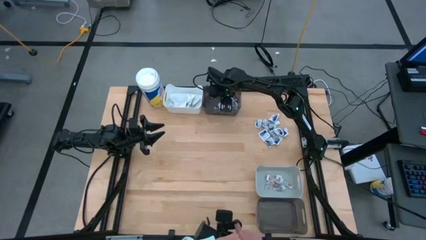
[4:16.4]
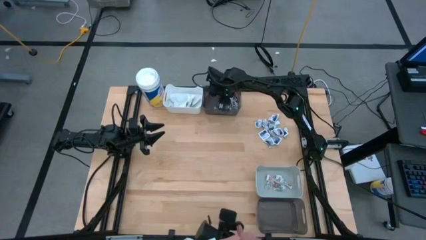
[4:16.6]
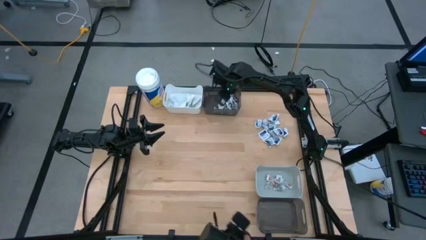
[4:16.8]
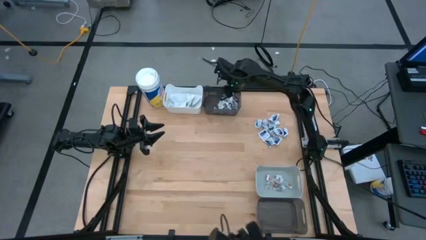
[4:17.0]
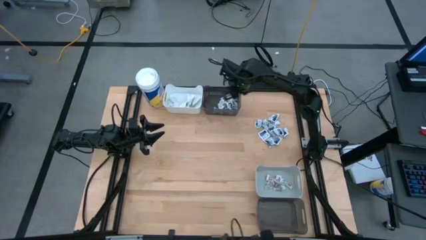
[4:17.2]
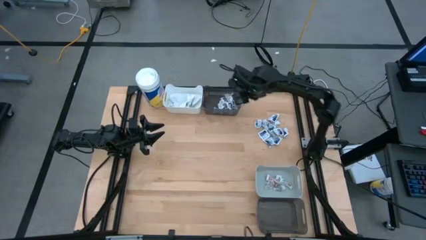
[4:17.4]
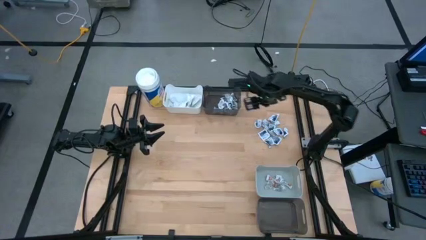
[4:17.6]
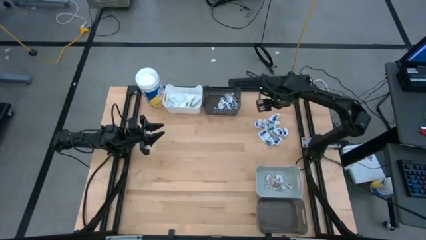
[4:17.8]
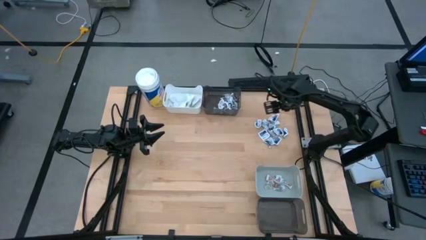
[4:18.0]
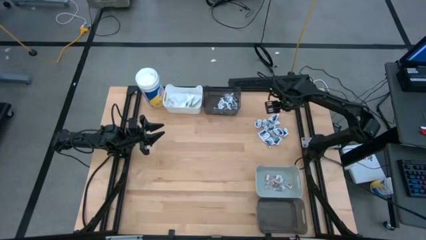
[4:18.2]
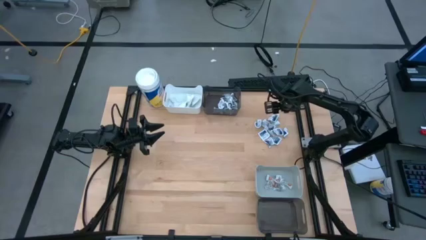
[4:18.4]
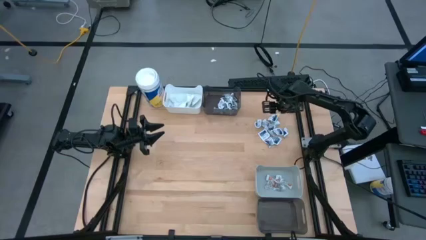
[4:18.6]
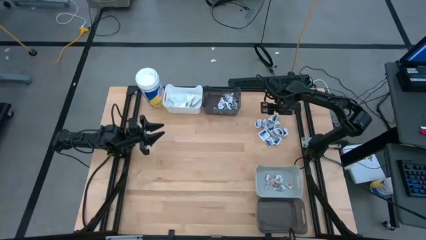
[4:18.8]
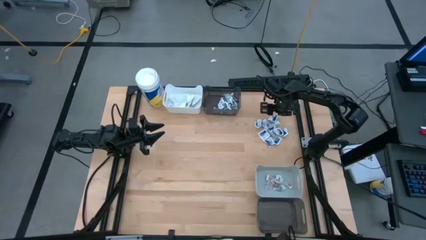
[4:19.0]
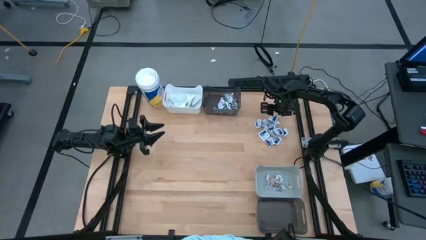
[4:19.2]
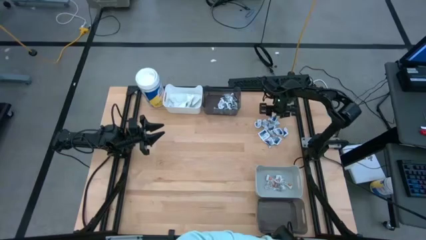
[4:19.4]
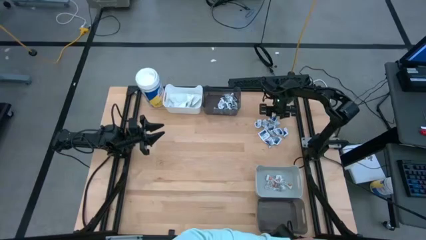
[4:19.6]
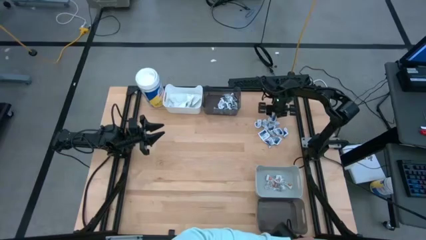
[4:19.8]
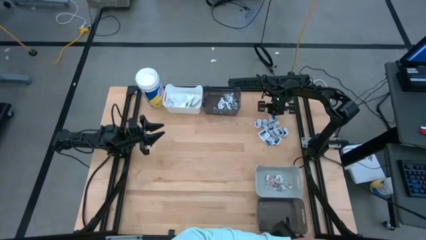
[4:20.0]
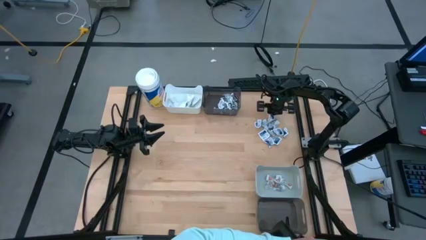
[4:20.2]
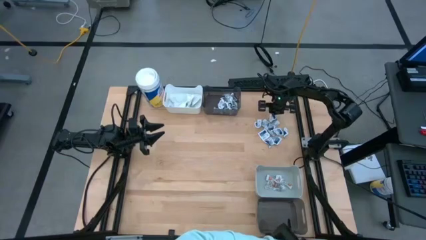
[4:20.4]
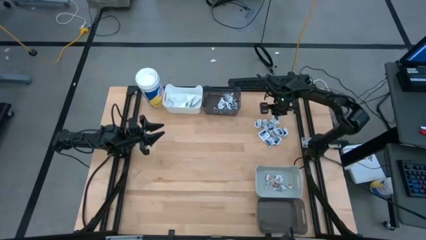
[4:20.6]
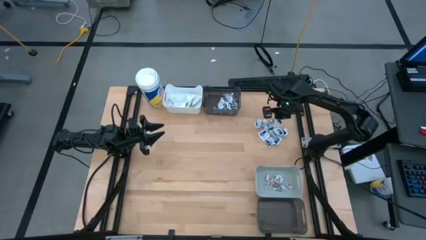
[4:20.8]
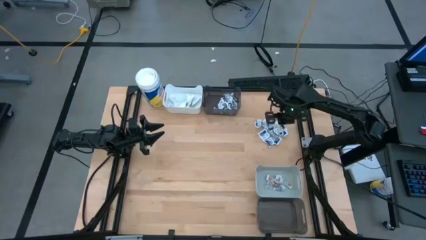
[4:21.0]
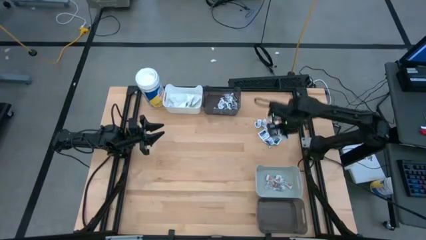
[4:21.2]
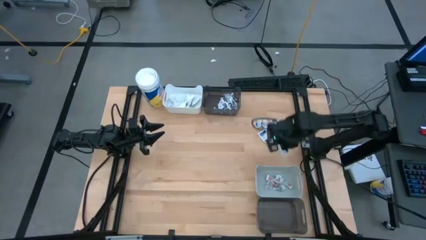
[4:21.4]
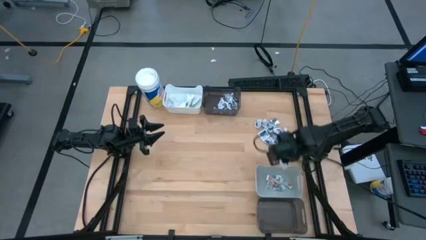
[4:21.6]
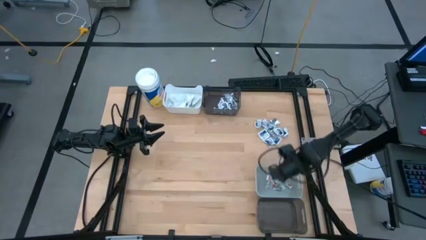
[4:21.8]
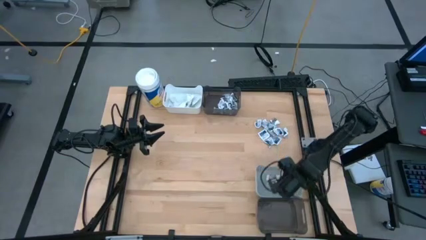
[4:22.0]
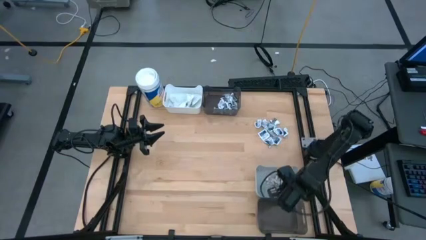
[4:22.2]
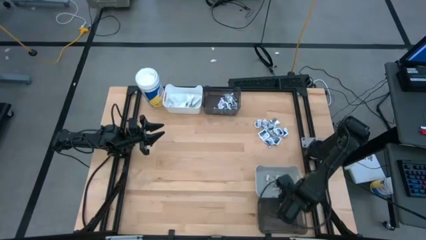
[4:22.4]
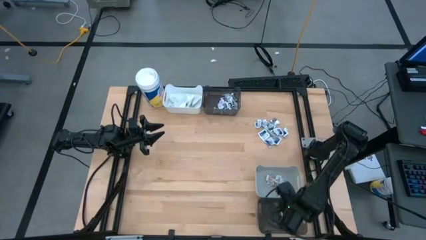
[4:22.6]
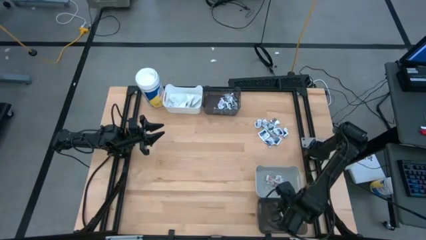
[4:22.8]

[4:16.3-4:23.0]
Task: Pick & Place First Aid Supplies
Put the gray towelette pack into the top black bin

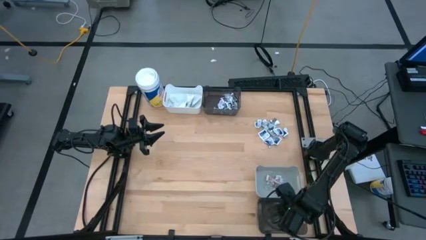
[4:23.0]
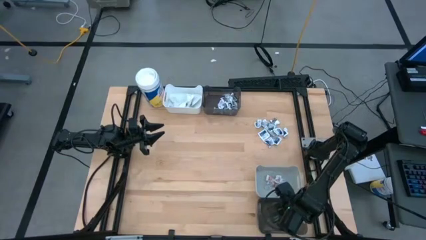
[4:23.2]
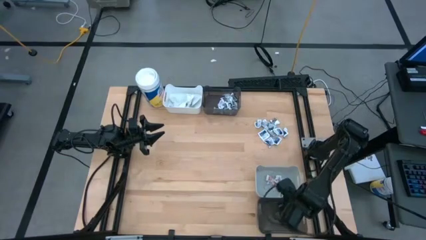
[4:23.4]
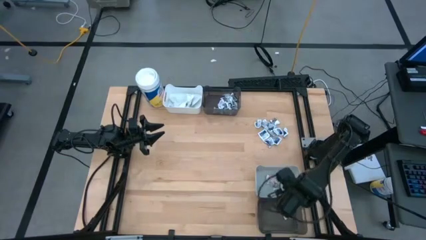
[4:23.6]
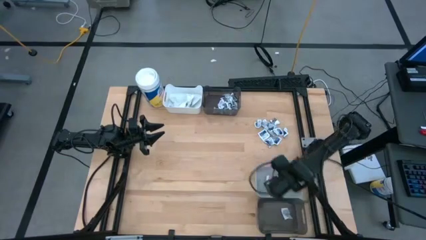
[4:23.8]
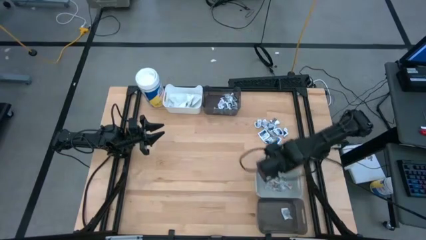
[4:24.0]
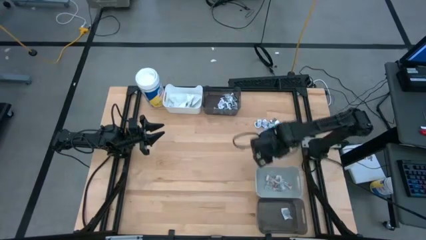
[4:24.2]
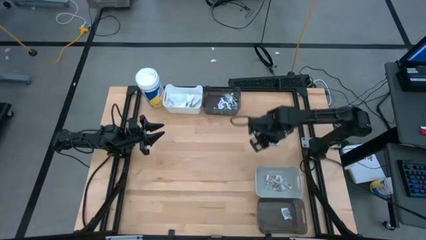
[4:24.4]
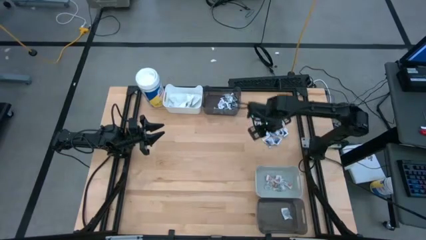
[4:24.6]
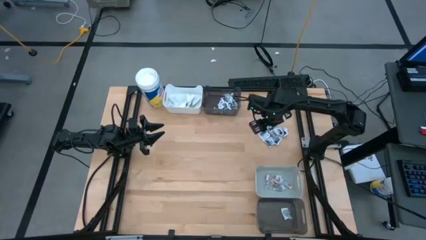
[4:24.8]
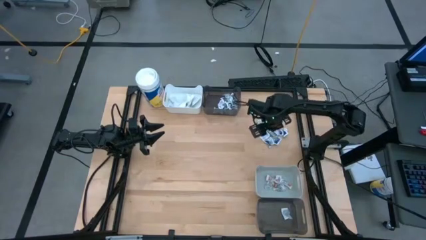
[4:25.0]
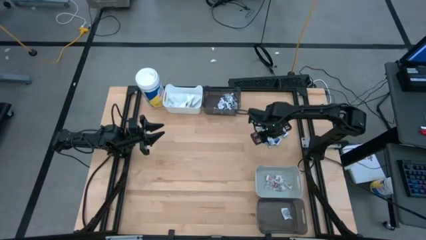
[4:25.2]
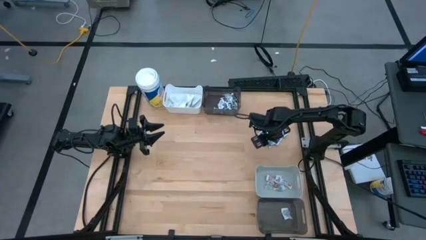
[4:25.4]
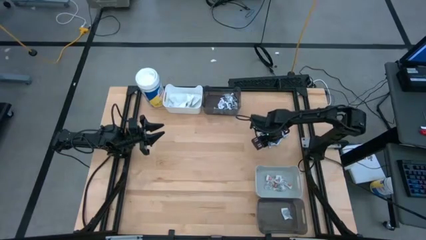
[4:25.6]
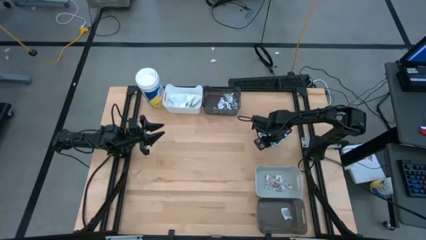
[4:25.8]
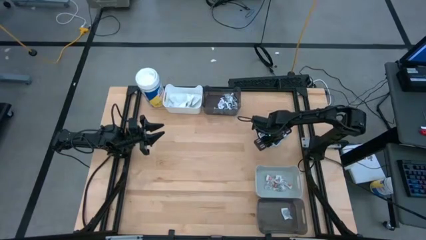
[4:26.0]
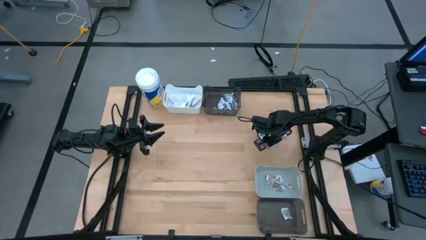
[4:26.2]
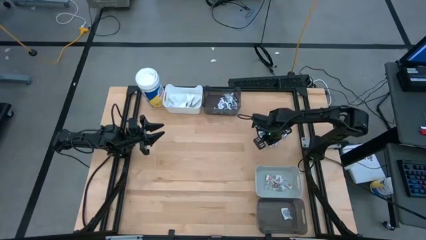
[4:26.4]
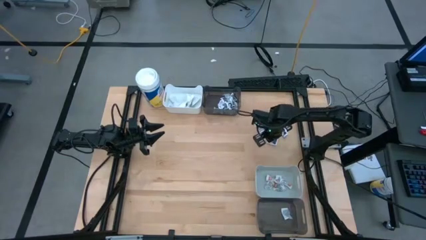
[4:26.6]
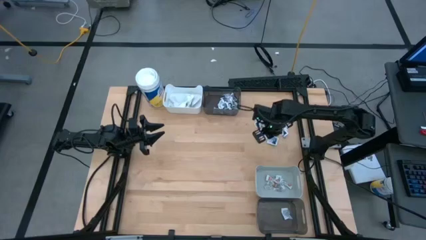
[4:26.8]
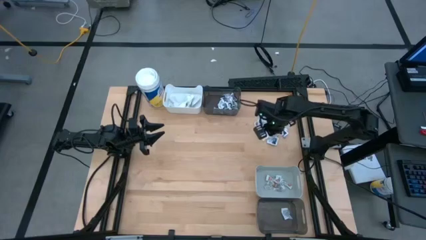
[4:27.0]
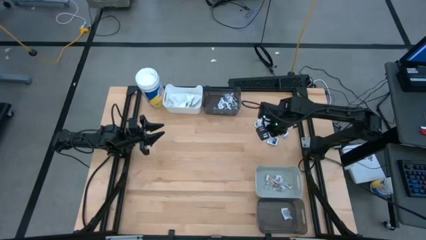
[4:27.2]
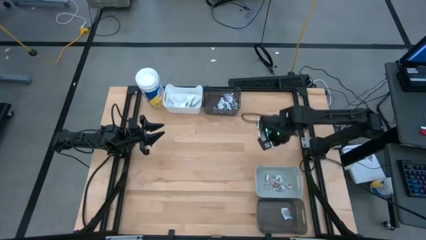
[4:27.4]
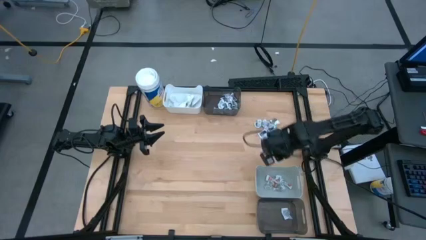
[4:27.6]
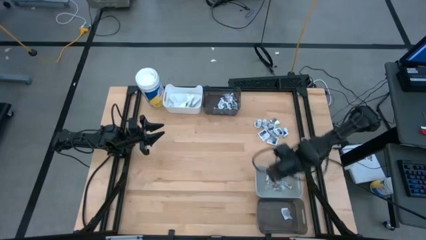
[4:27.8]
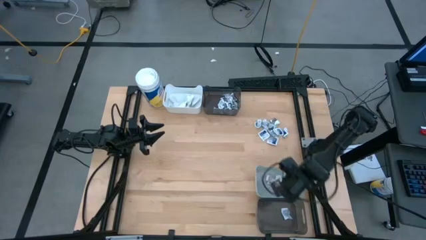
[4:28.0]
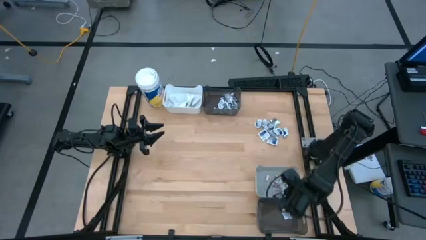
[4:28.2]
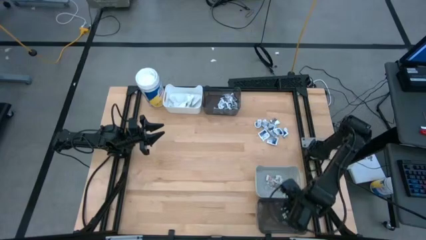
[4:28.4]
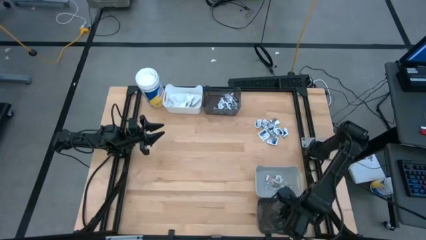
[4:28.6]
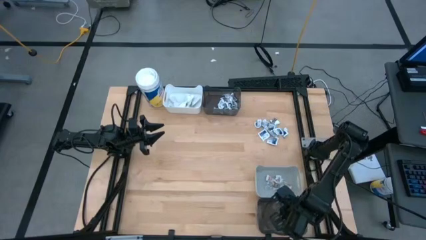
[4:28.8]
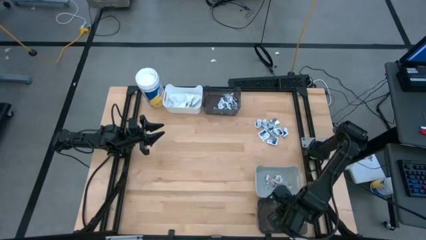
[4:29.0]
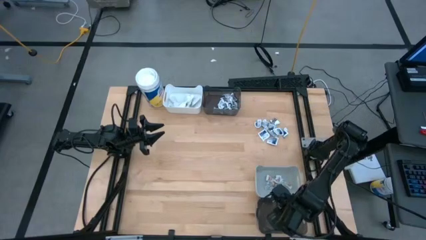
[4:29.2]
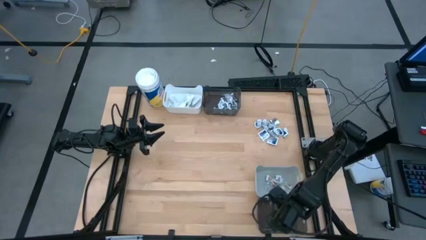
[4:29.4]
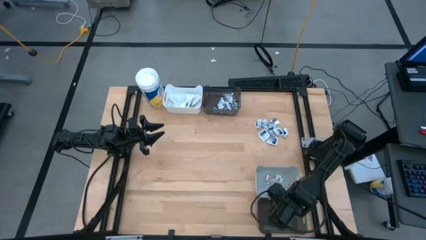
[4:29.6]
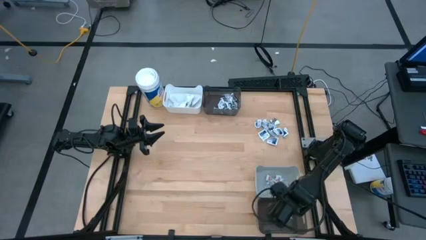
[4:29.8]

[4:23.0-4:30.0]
Put the blue alcohol pad into the bottom black bin

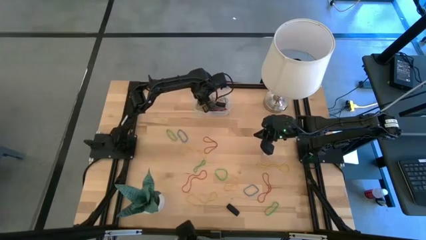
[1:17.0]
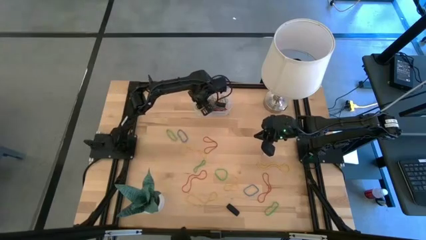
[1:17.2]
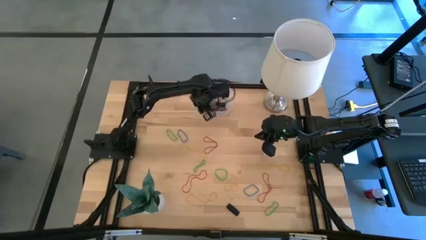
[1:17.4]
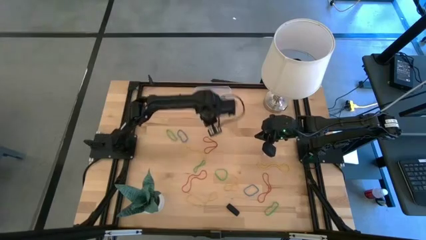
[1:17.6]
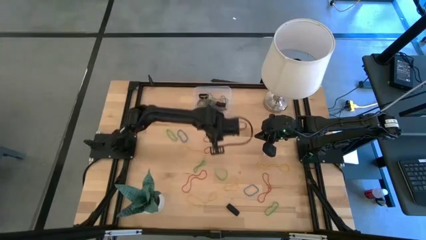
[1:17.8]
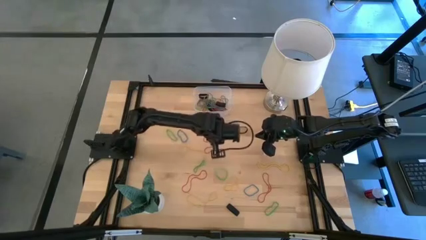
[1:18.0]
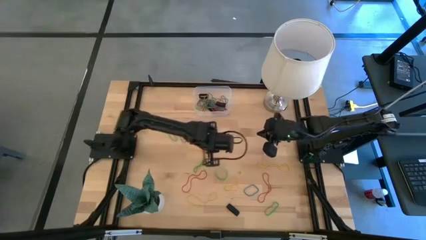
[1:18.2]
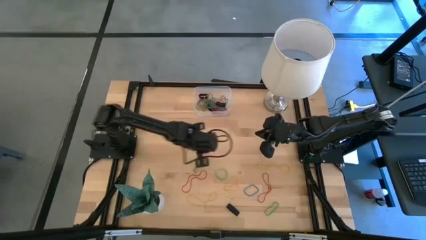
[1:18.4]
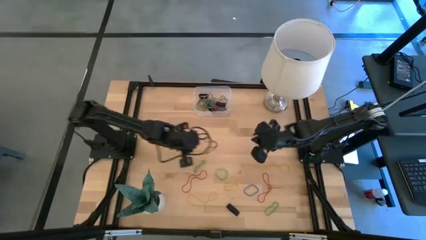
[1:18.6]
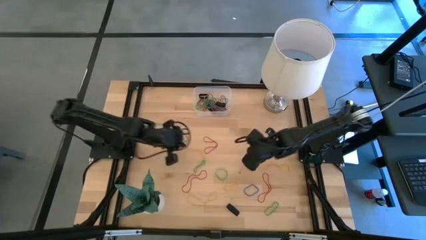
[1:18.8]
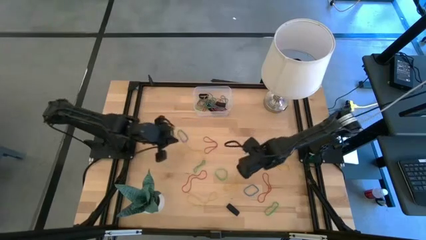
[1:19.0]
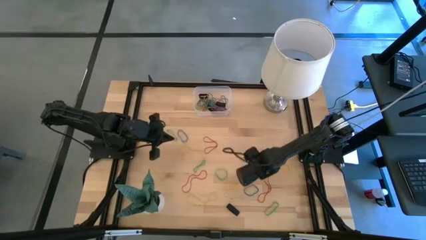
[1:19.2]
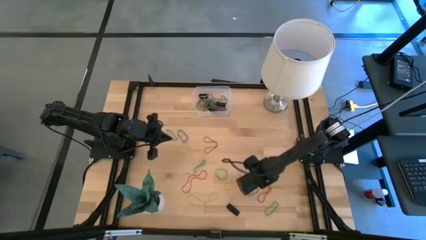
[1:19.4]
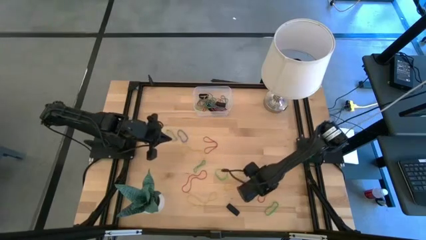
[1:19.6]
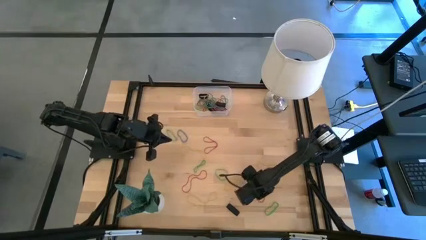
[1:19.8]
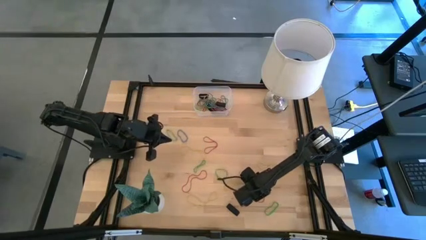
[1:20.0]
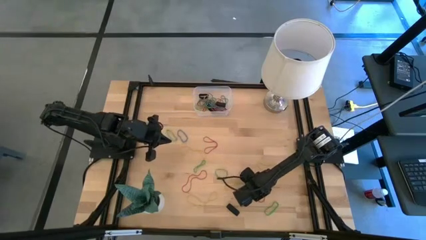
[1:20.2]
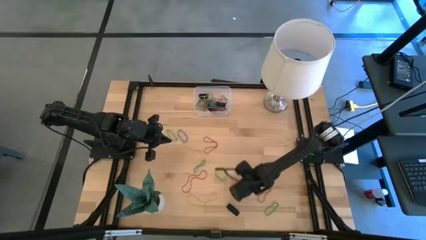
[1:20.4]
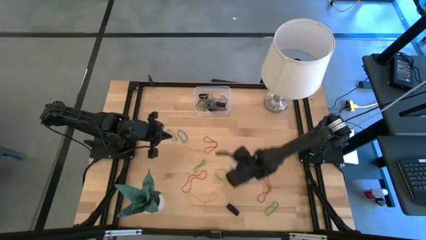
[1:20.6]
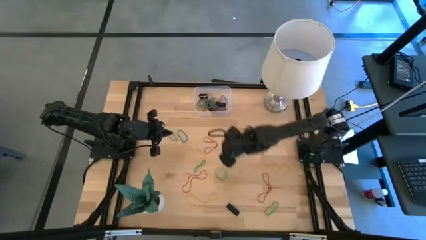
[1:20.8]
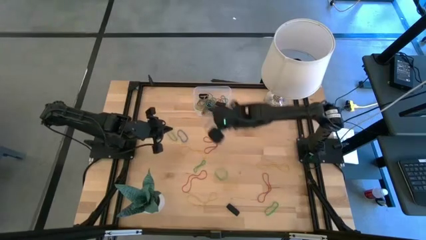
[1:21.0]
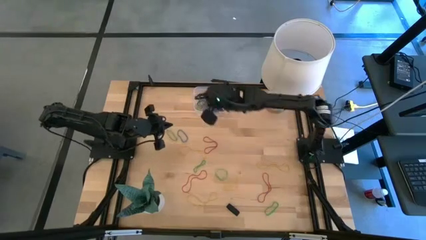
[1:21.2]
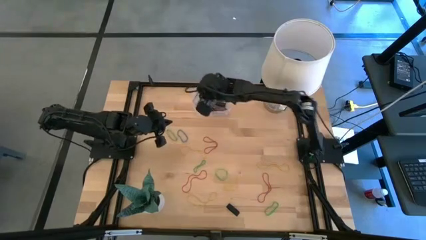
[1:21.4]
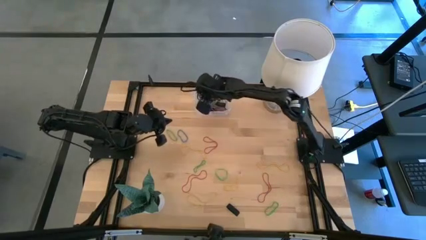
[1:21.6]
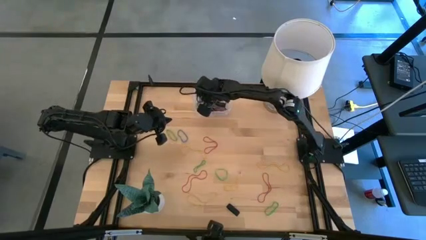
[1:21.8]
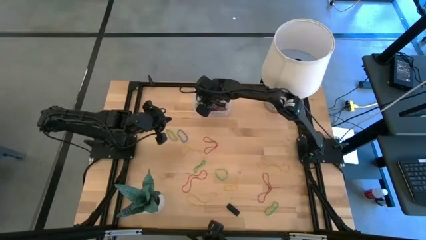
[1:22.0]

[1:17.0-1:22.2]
Task: Pick and place rubber bands into bin
Put the blue rubber band into the transparent bin
